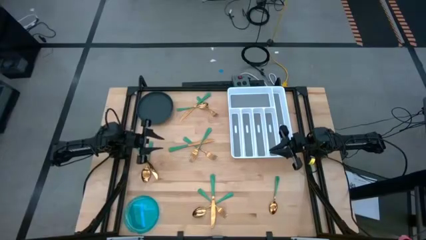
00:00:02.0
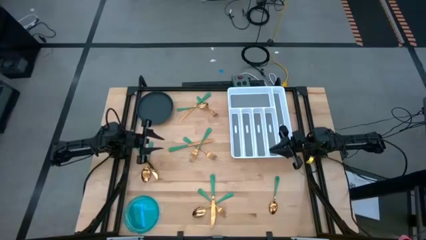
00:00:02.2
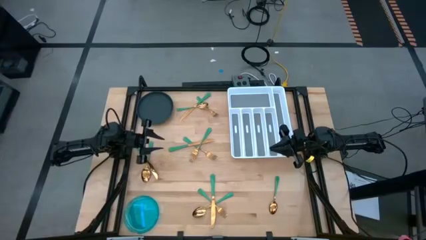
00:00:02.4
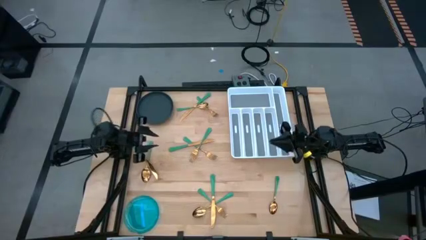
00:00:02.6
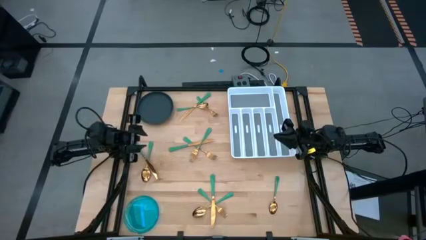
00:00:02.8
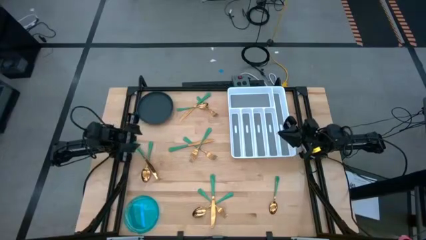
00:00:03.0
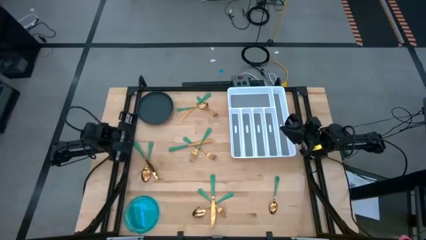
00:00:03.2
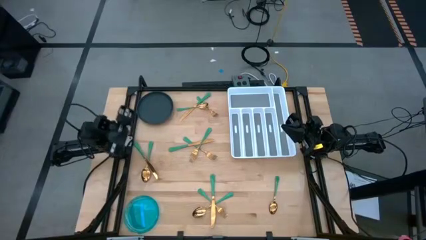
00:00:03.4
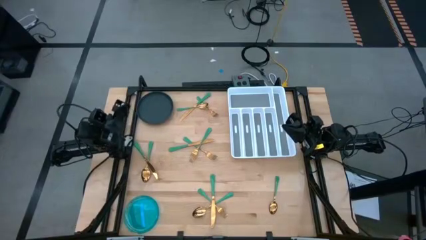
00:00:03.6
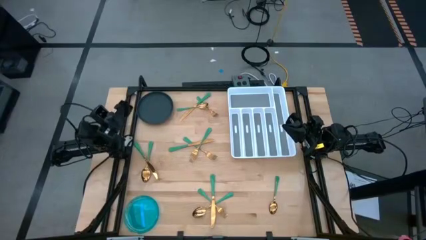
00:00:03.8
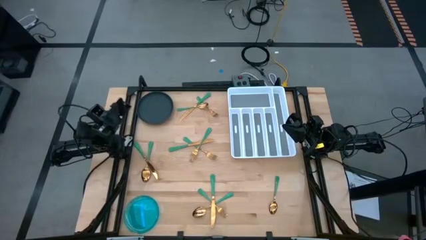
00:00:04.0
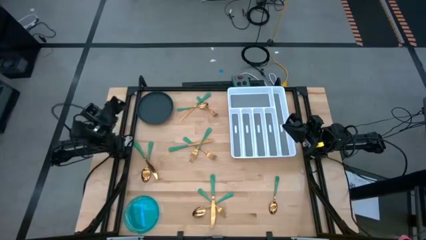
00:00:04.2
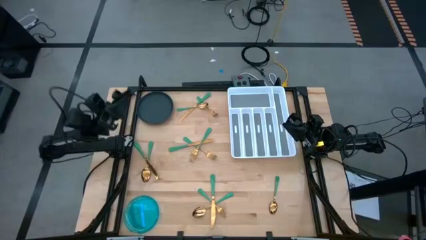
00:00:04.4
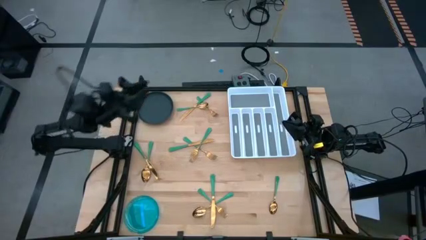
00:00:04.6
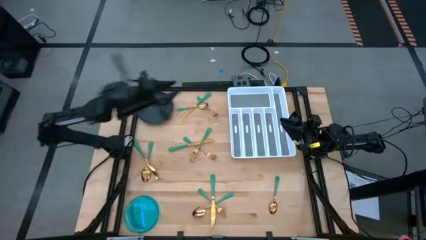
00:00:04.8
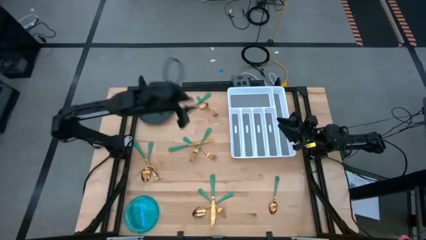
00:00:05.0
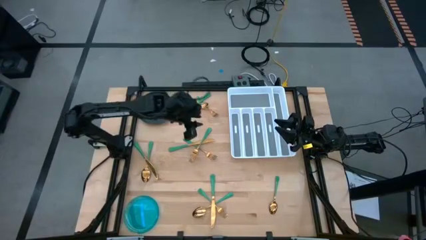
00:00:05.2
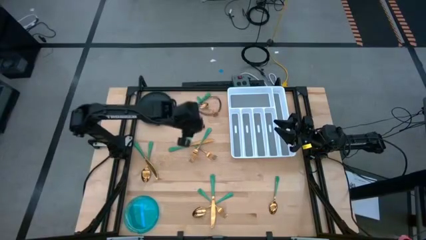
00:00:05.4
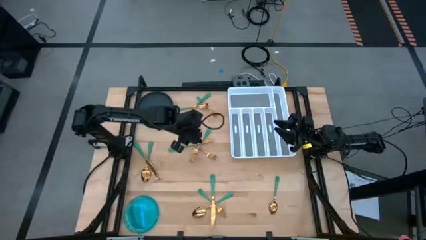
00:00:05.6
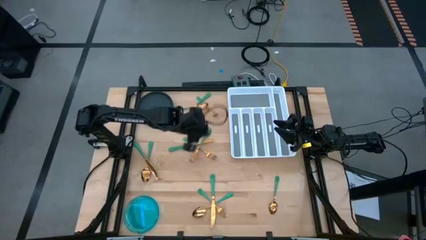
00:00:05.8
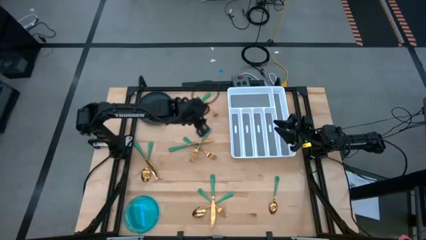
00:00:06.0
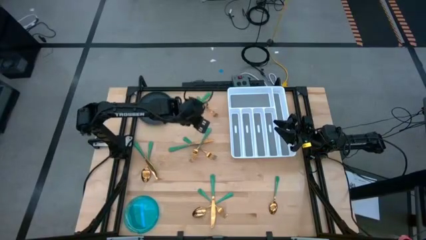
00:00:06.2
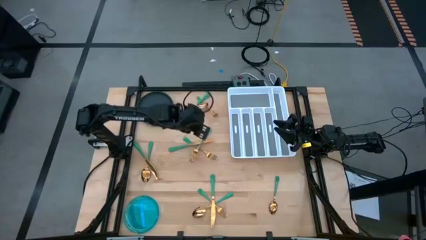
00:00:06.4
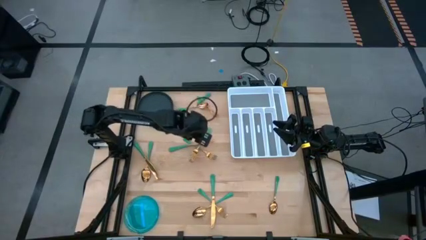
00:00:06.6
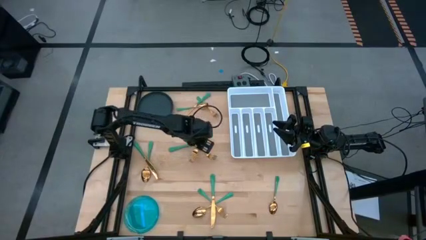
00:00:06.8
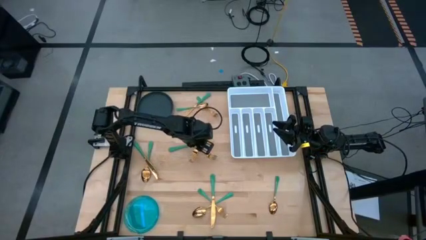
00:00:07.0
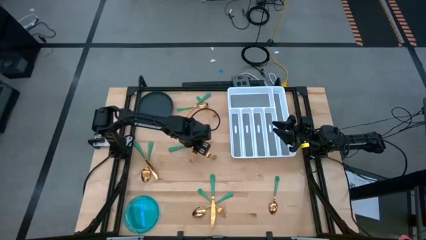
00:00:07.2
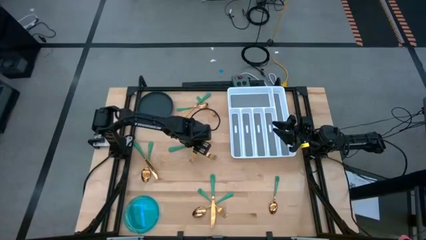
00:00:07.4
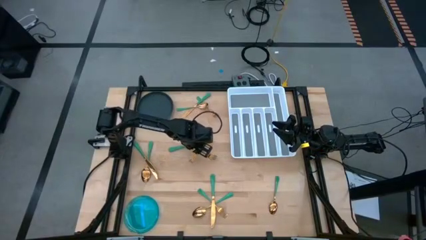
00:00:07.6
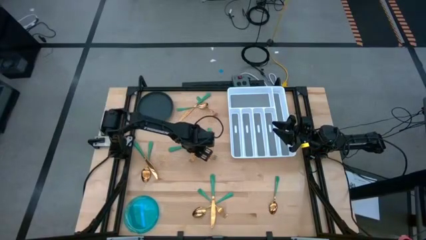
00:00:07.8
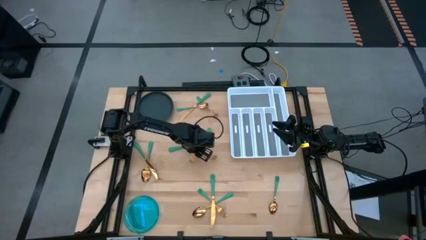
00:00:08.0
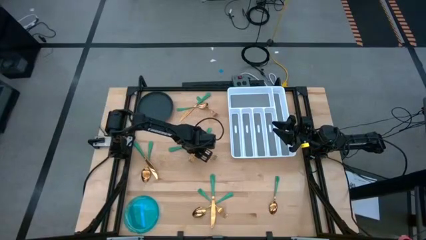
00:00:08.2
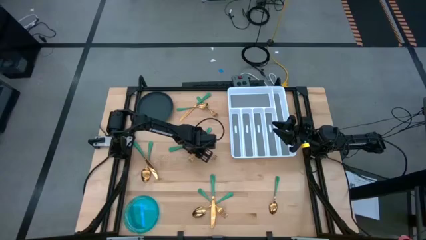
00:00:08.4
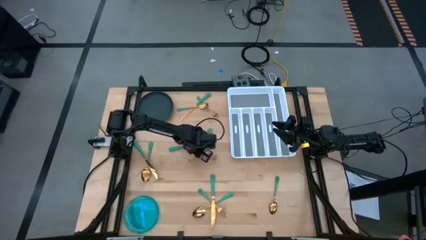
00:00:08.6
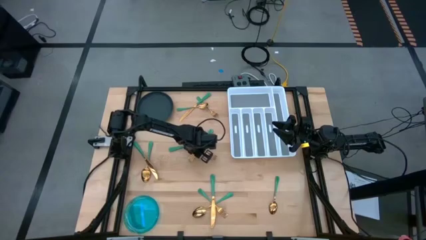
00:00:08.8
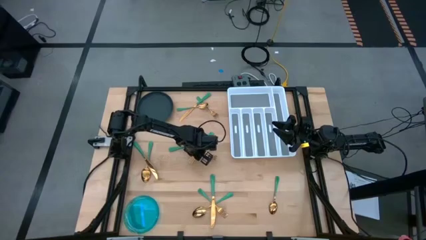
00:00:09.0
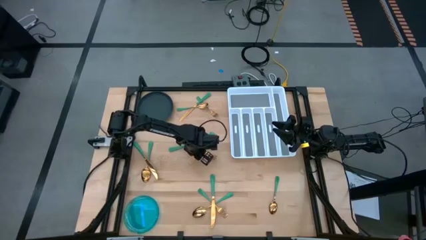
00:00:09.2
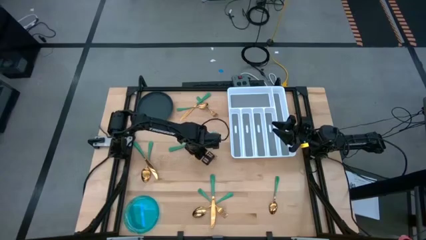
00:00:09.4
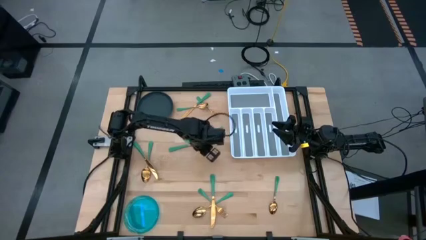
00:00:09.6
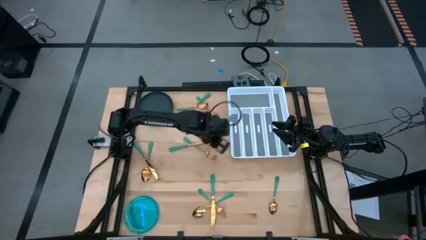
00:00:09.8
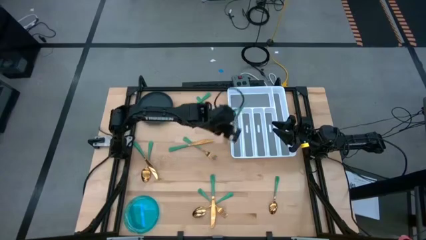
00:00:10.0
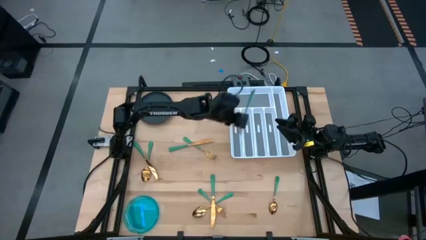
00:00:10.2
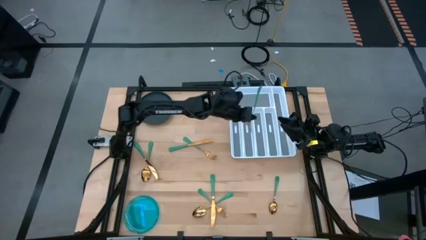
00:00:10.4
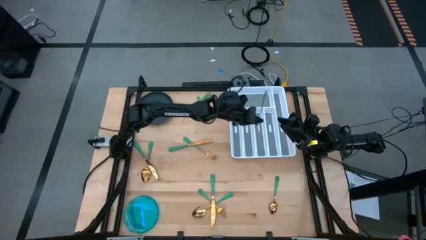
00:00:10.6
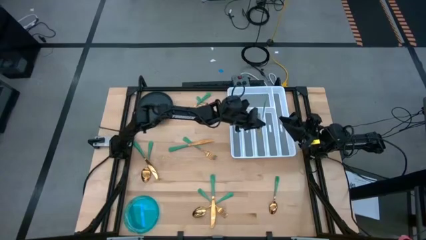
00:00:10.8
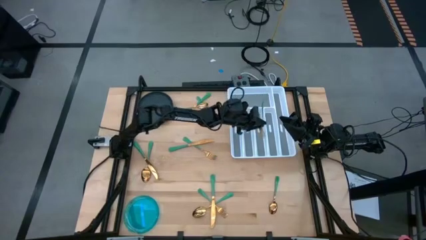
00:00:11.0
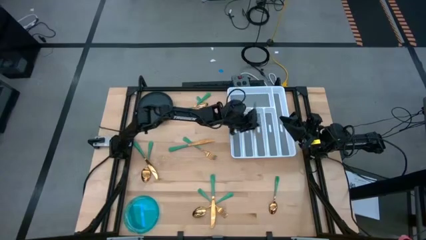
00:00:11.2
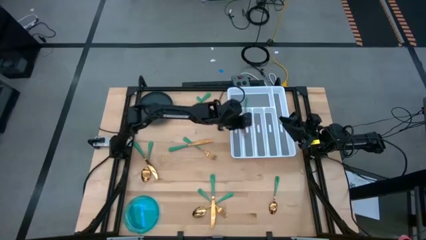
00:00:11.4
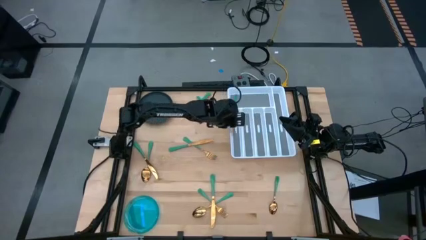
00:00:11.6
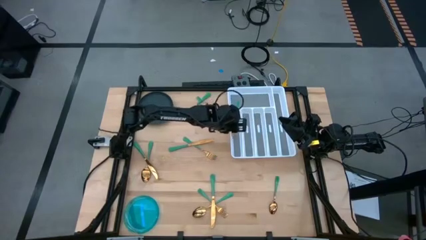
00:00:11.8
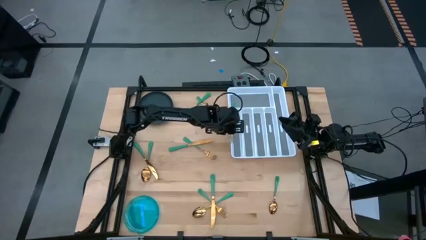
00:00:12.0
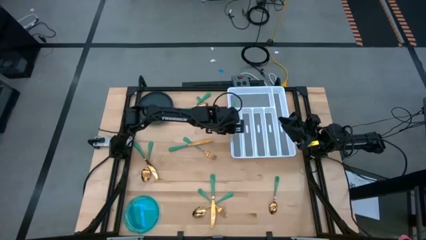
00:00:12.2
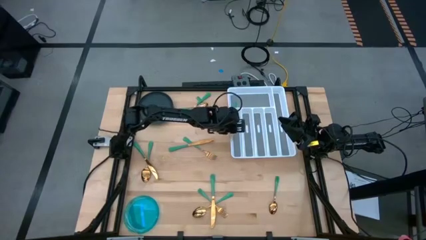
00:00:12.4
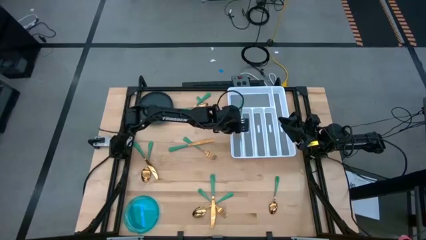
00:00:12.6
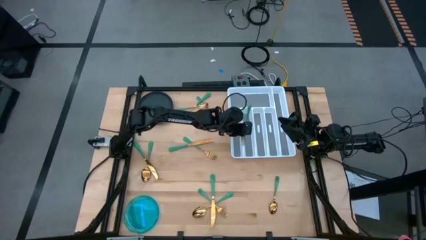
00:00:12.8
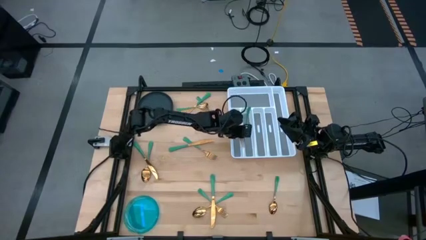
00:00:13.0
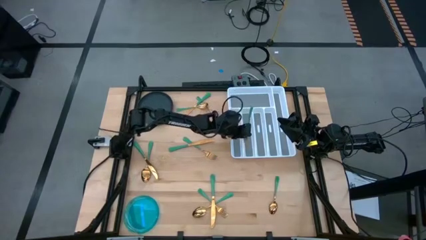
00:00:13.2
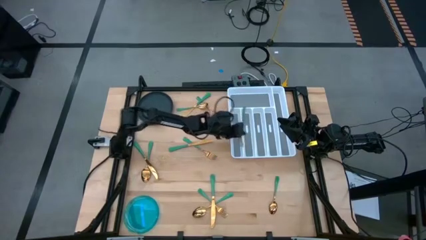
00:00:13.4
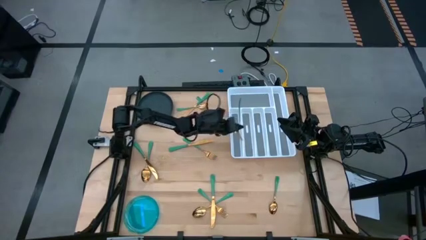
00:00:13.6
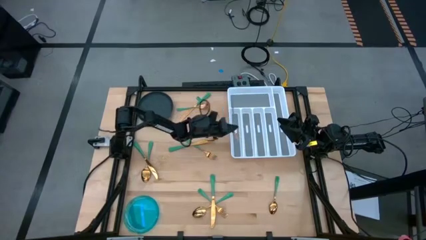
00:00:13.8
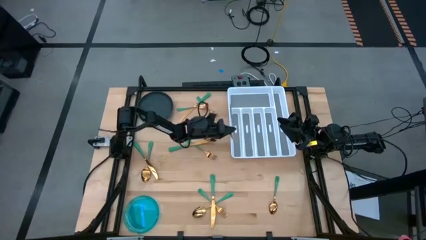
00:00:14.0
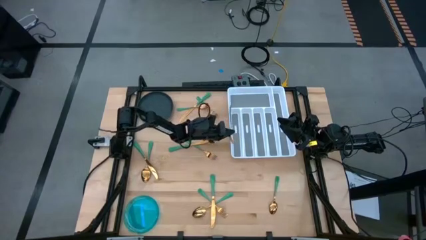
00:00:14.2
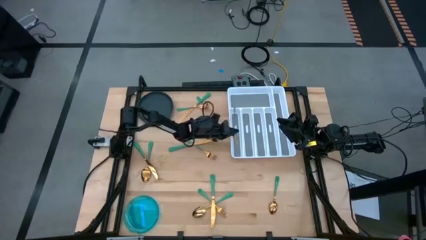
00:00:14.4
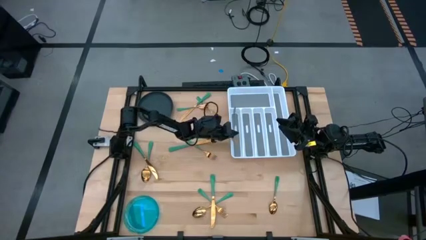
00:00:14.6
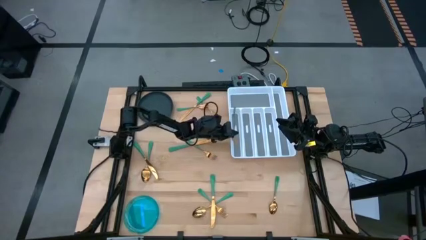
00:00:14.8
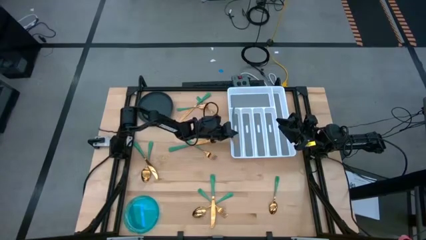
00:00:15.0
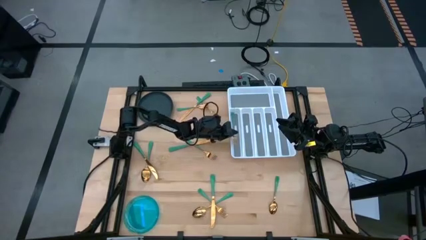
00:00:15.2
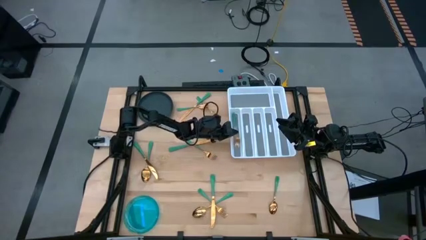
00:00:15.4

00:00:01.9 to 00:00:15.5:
Task: Sort silverware
Put the green fork into the white silverware organizer

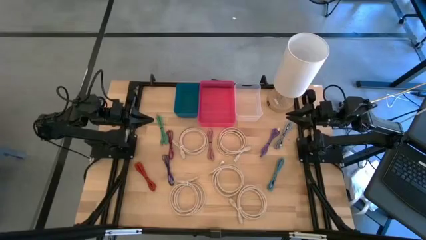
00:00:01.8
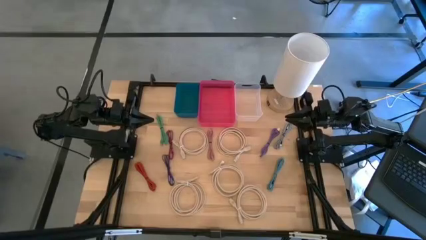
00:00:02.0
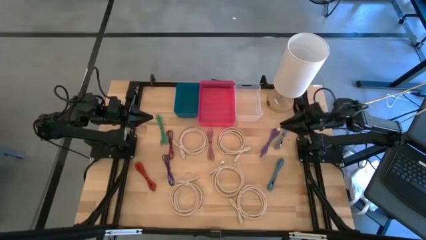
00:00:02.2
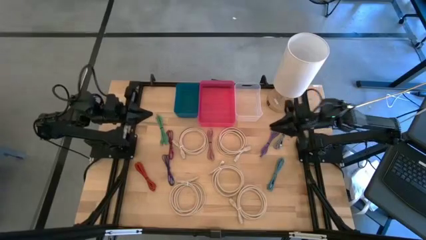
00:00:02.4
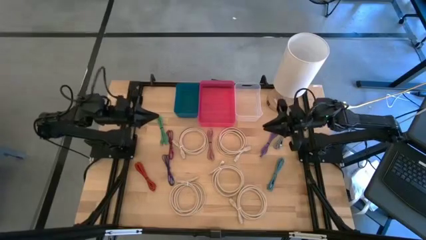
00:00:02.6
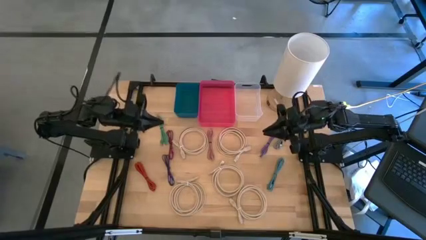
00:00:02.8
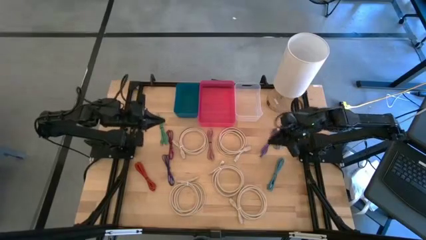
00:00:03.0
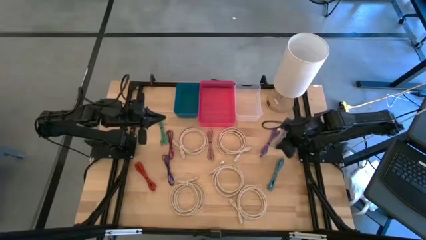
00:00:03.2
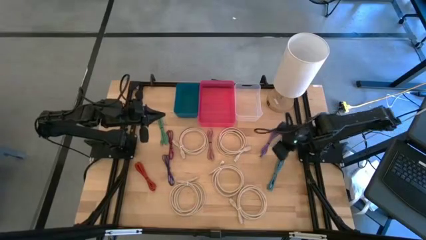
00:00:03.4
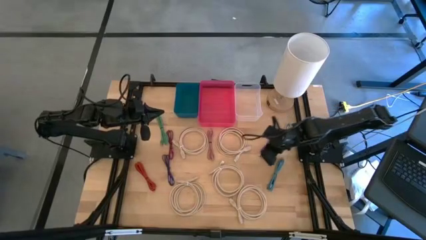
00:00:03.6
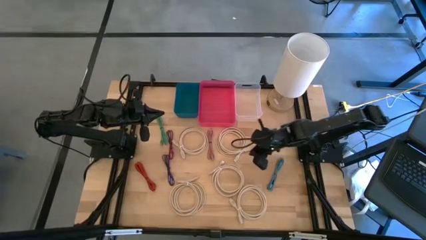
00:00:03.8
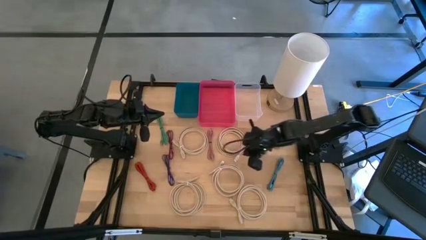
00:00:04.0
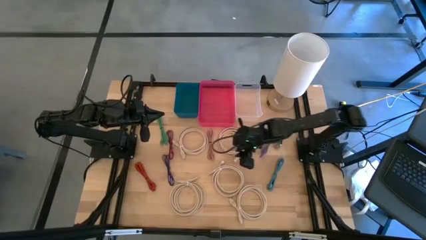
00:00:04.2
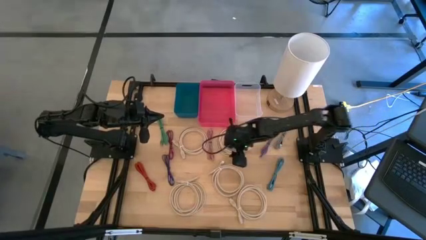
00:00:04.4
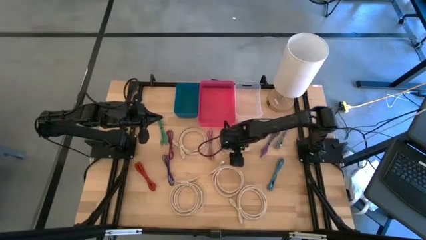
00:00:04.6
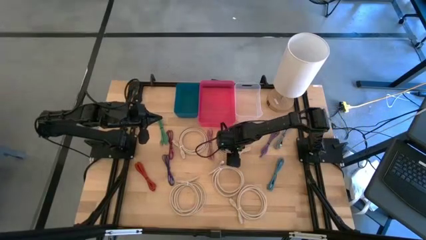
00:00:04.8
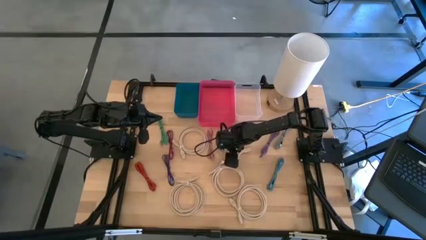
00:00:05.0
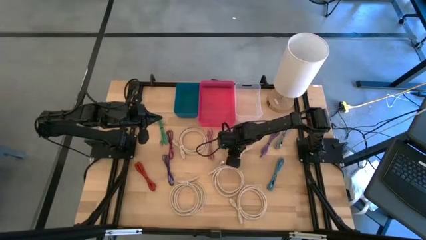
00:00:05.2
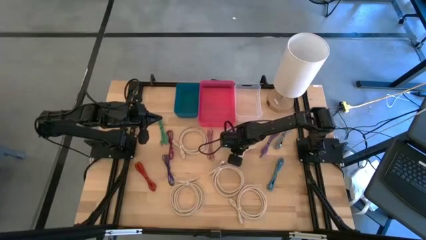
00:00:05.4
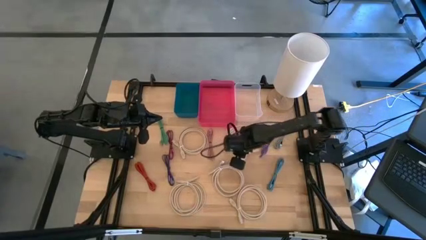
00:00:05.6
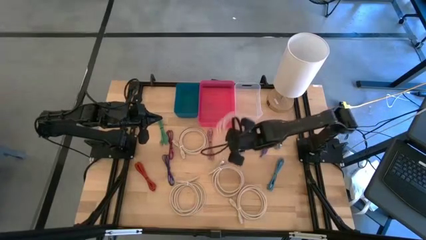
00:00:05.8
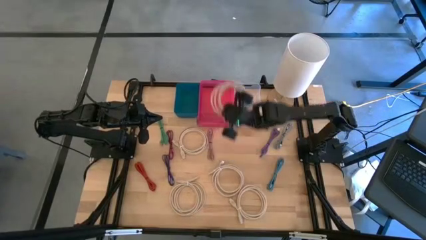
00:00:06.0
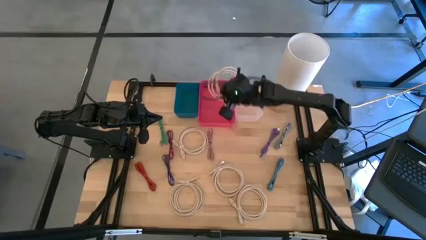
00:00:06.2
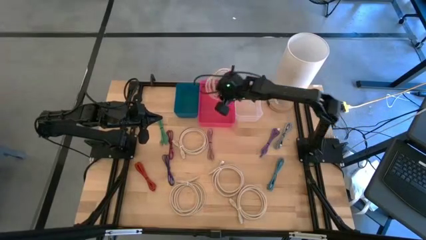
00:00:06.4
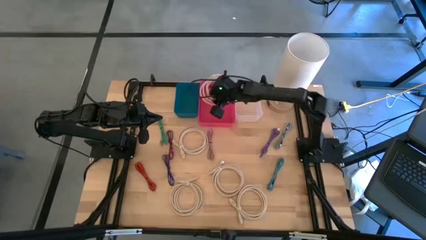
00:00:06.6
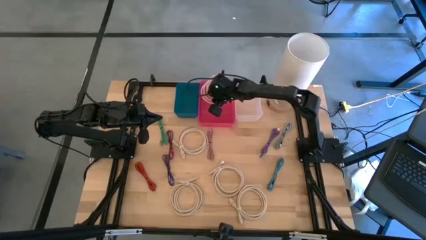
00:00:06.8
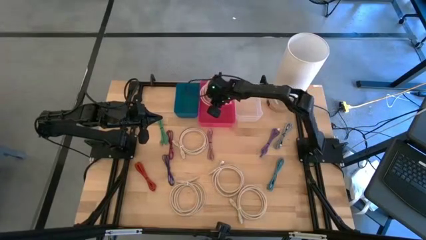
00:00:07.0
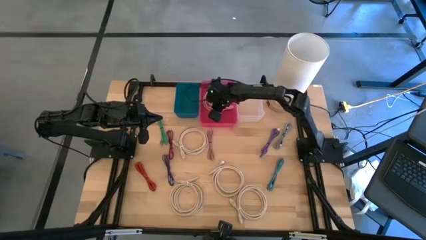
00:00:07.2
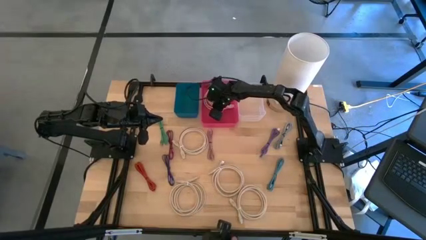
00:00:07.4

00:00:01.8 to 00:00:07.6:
Task: Pick & Place USB Port
Put the light brown HDMI cable into the pink bin
